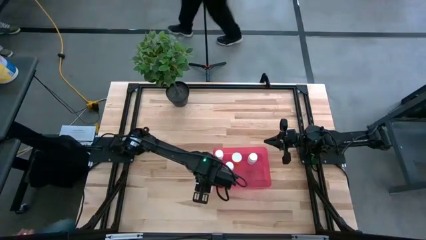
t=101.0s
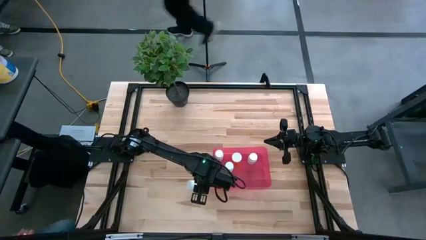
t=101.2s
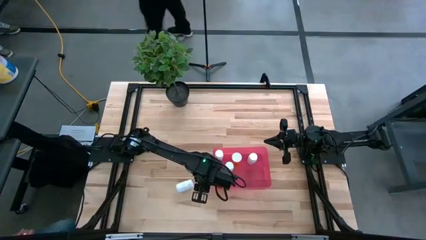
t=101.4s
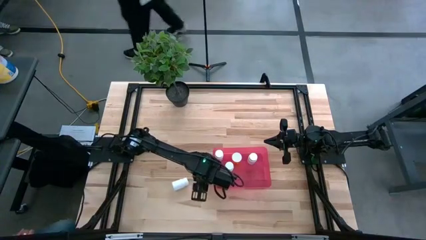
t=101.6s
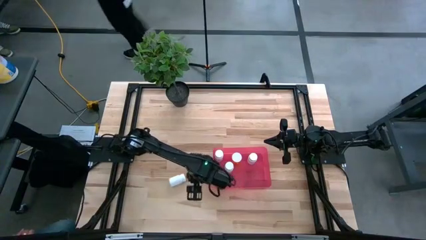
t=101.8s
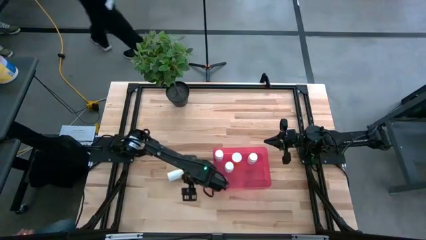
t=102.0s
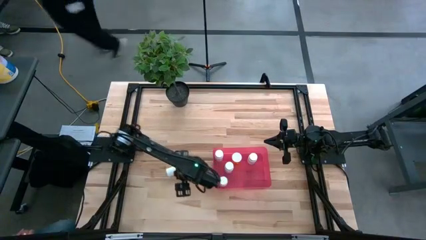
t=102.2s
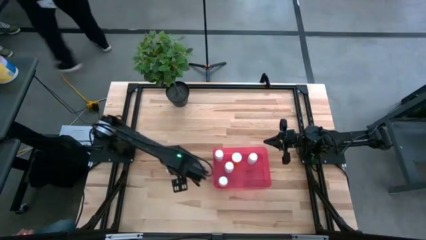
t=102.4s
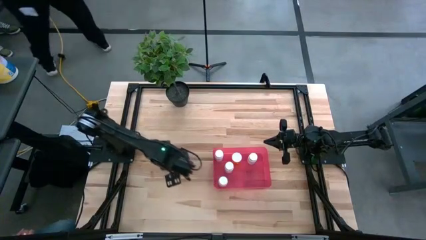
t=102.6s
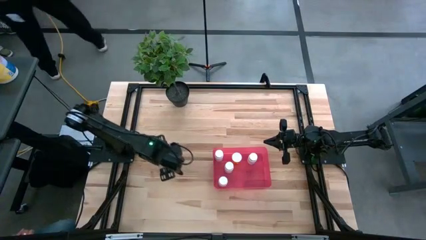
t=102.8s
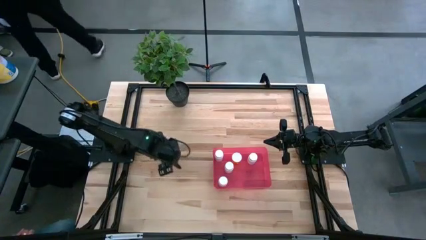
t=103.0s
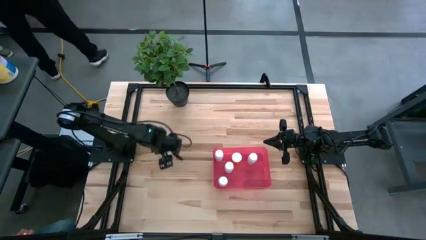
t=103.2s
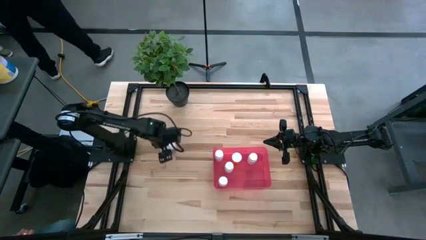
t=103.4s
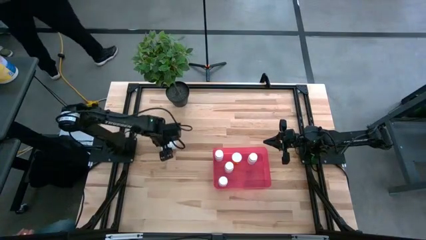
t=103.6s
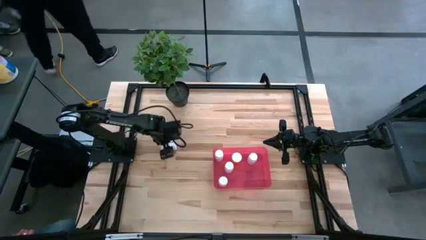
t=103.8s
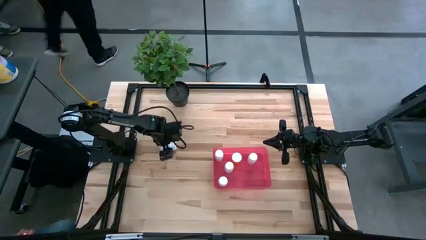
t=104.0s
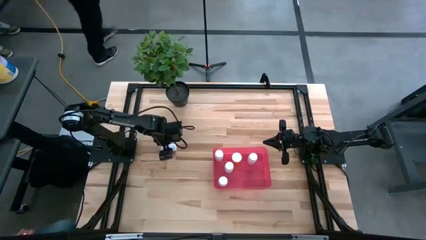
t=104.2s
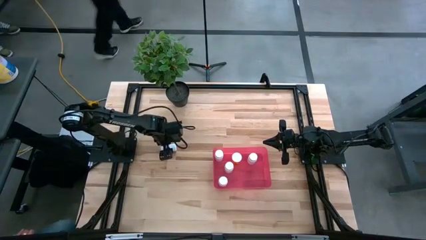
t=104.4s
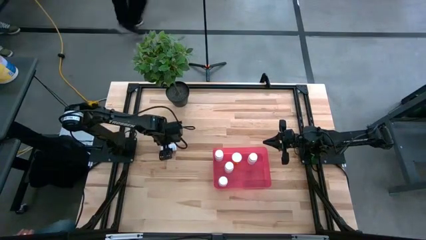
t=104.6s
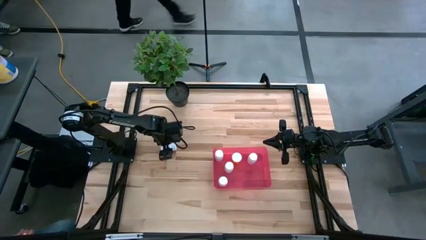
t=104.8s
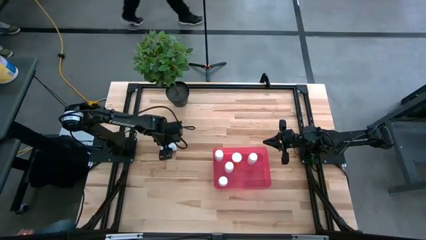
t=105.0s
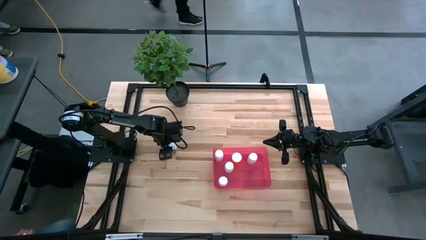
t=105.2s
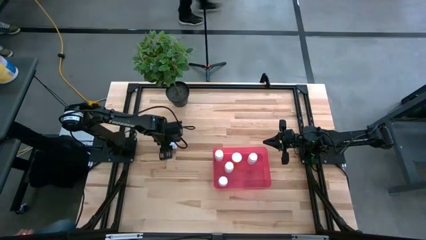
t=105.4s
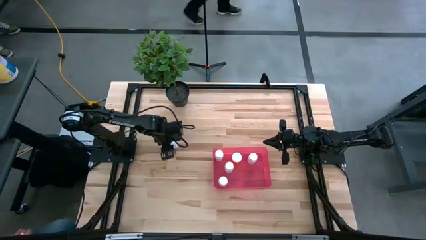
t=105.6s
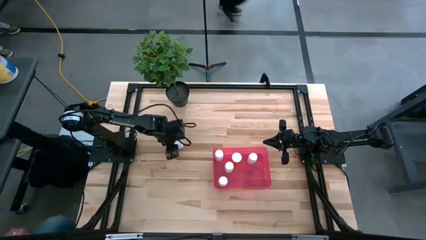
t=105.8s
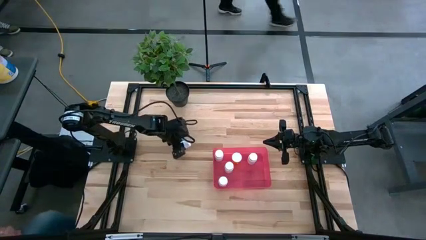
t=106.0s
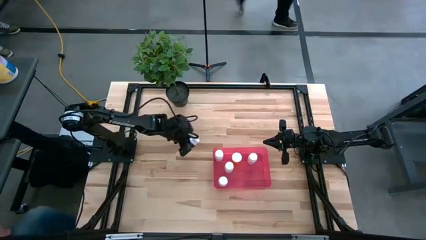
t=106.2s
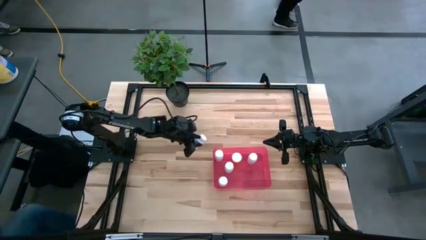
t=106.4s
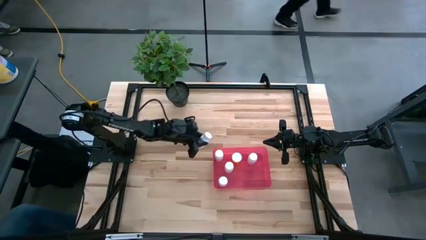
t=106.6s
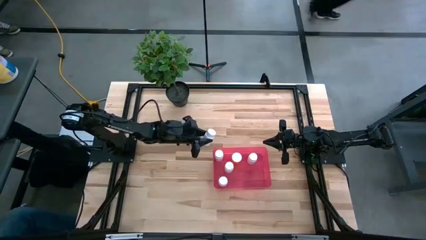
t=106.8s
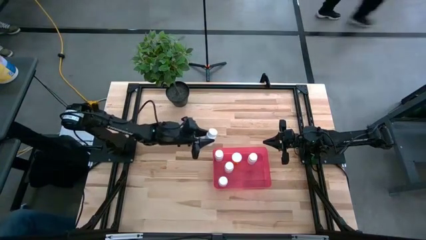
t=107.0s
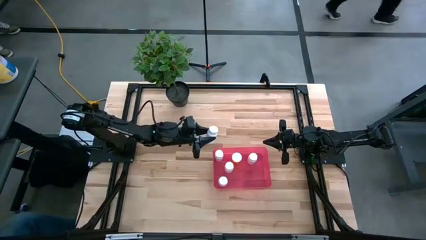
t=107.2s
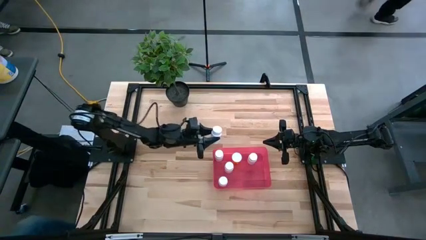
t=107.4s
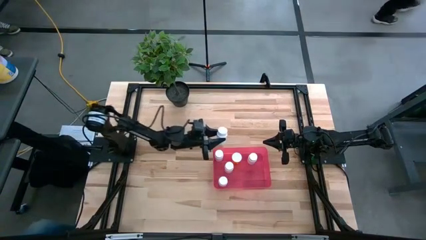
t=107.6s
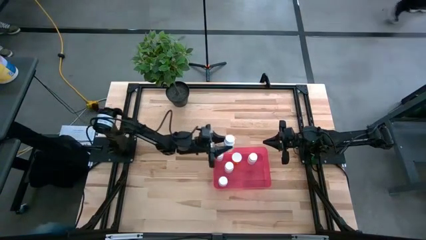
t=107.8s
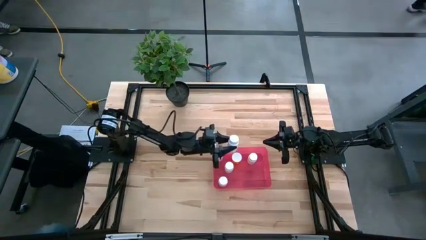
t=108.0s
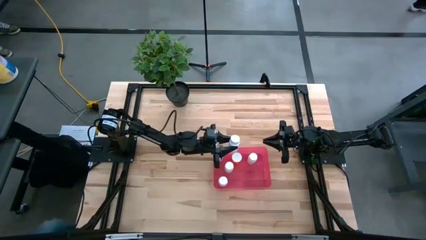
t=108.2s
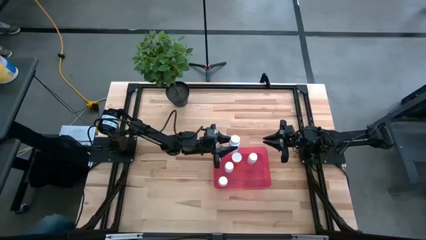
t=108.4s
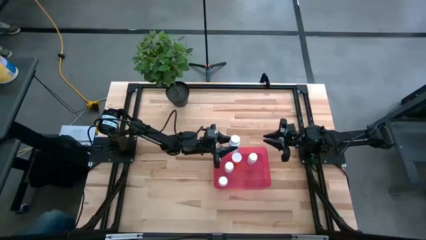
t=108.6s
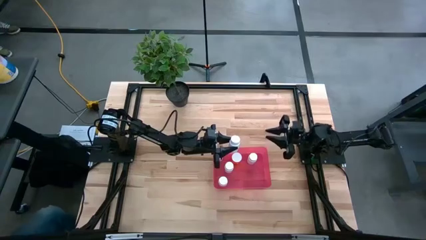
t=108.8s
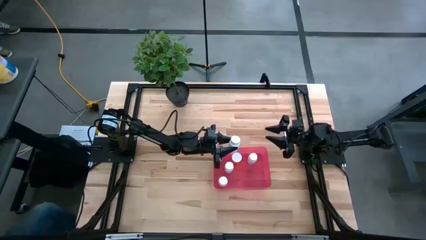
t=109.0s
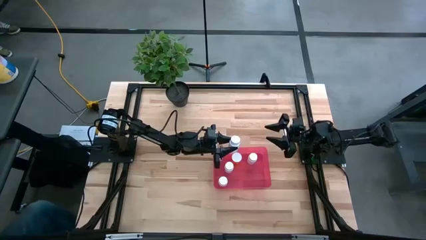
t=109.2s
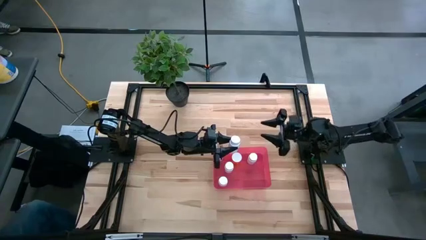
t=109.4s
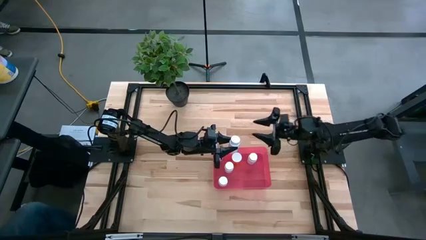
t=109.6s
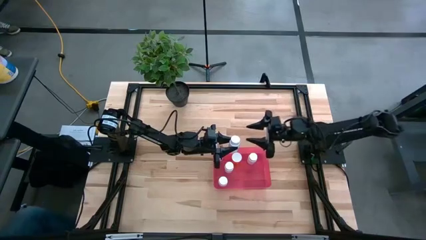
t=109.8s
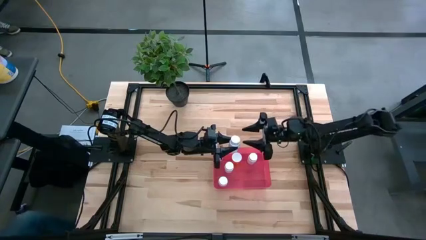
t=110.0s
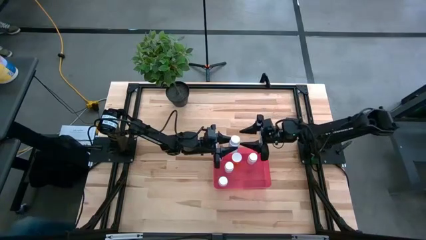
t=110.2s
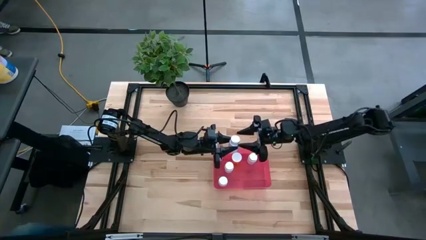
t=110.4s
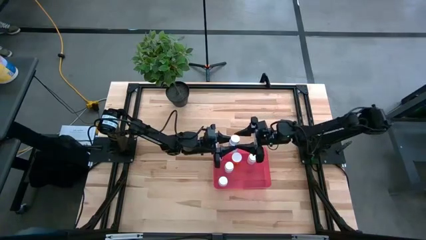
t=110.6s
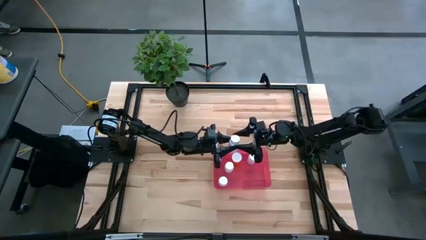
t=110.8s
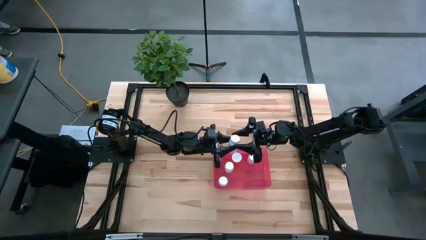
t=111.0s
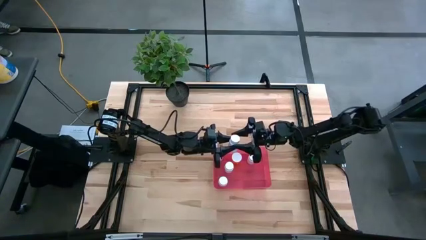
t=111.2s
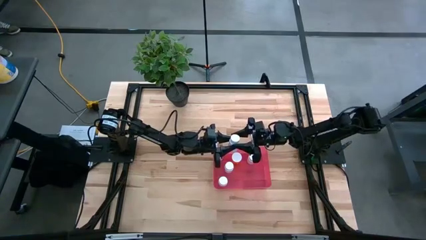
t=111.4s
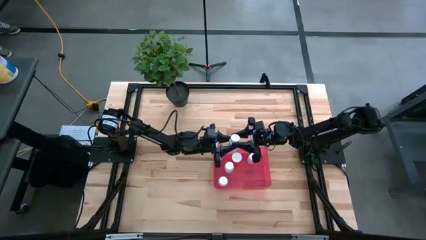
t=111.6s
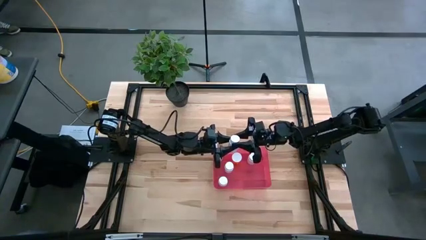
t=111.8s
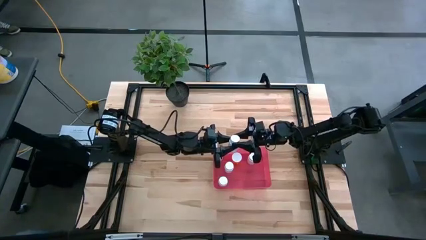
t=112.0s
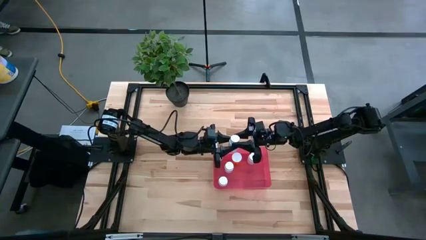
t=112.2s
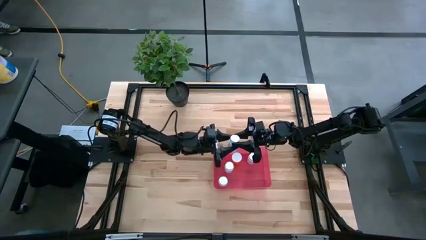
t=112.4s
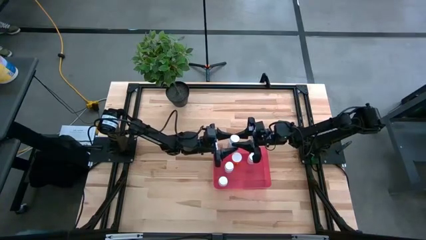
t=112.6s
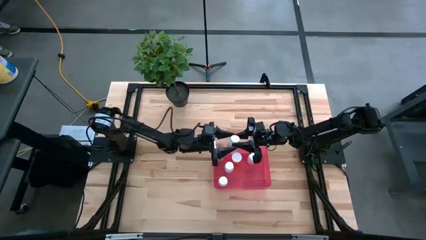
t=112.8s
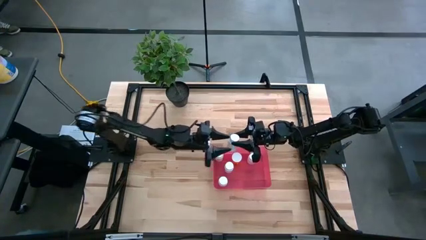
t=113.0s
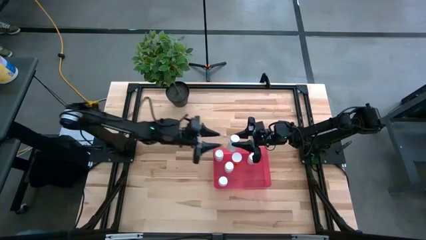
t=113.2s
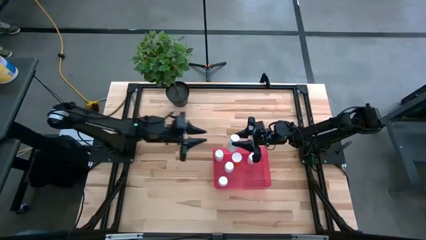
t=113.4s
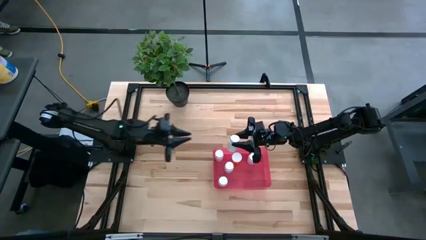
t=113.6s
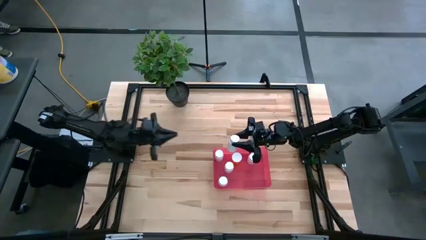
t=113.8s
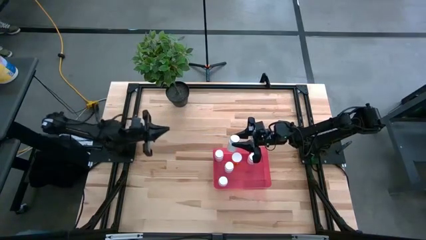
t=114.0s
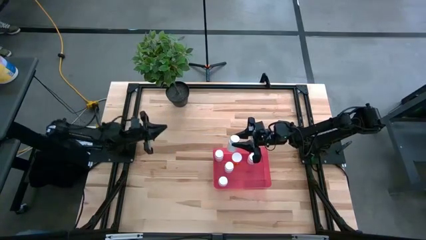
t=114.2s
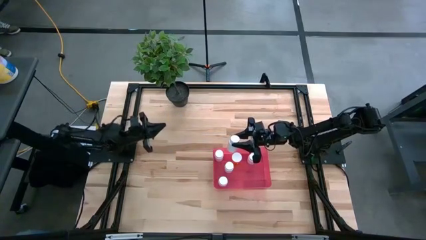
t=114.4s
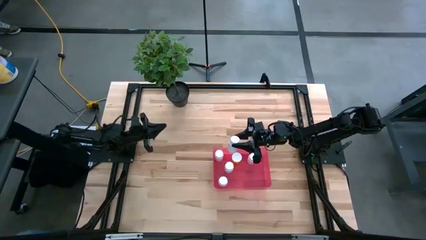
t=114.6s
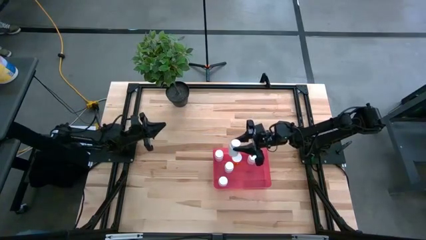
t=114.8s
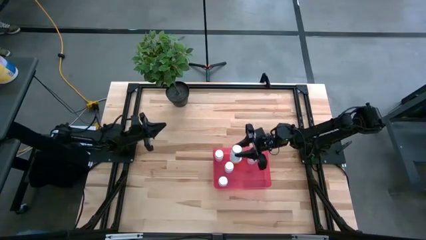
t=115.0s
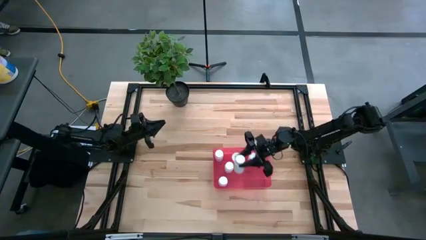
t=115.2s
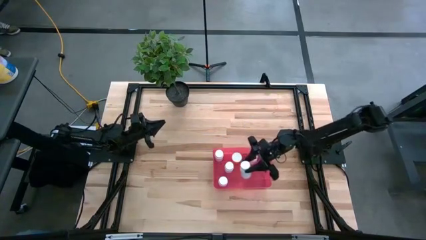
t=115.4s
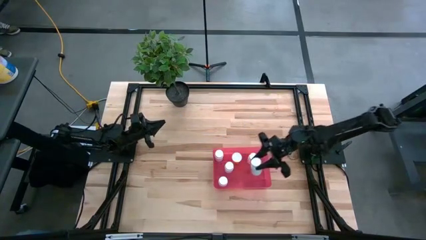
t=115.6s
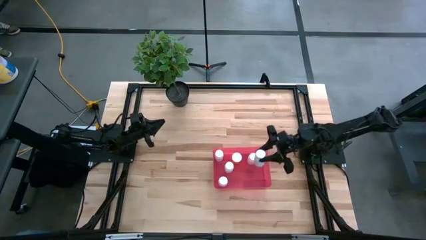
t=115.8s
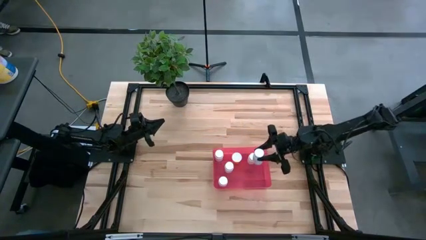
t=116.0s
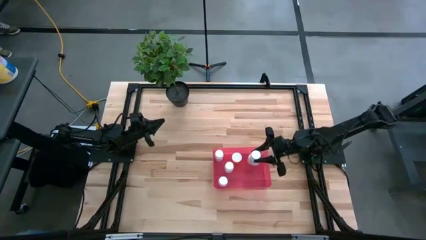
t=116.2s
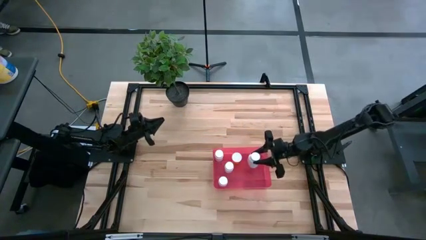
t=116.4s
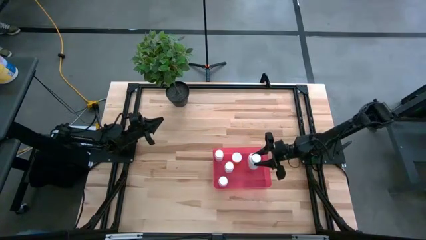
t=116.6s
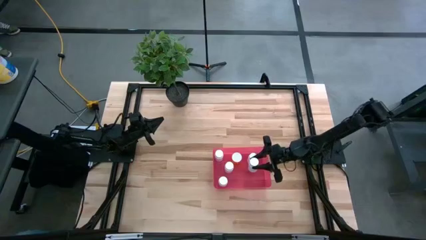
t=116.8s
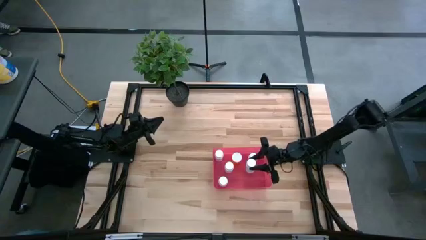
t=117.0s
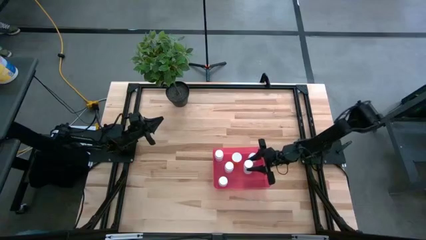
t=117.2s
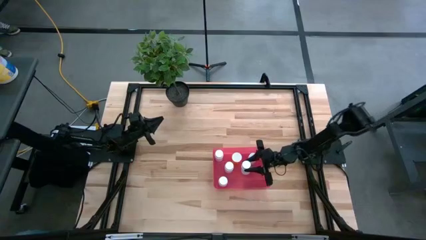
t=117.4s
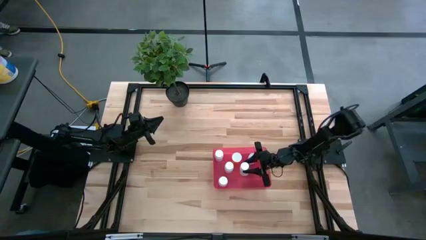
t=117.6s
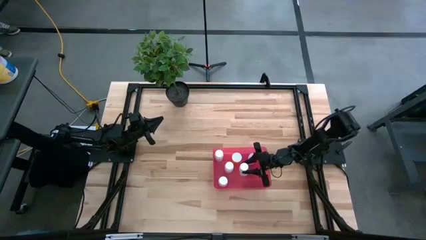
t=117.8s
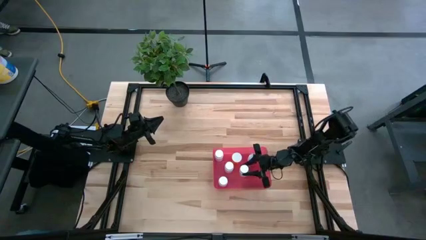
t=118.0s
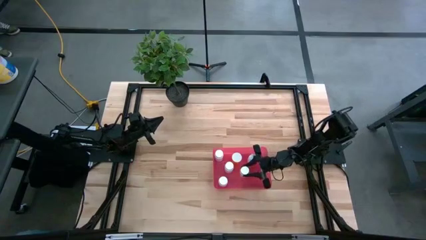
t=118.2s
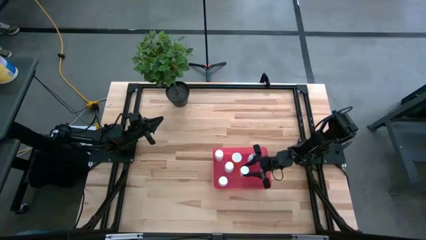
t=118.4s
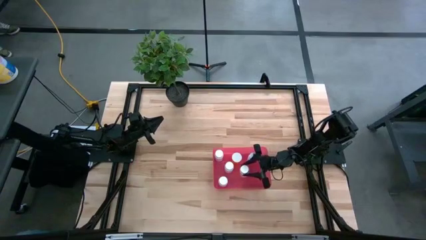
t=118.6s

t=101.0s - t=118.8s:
Task: Pick and place pill bottles into a basket
Put the white pill bottle into the pink bin
